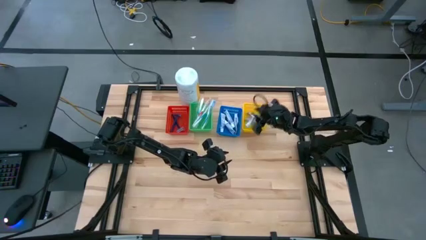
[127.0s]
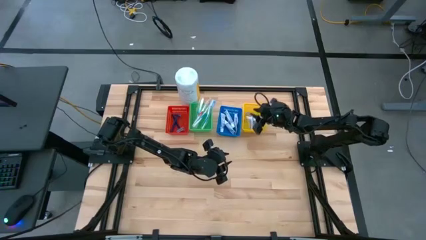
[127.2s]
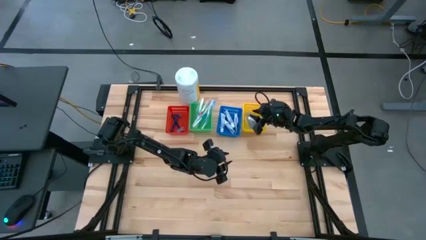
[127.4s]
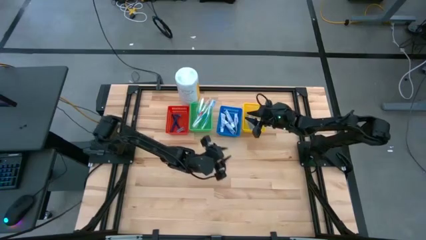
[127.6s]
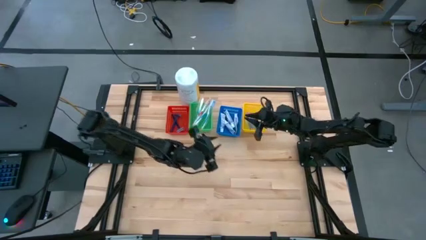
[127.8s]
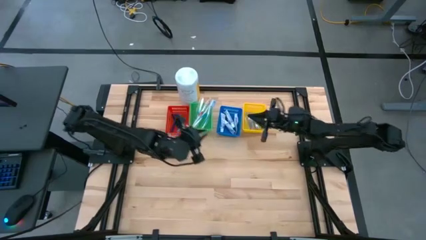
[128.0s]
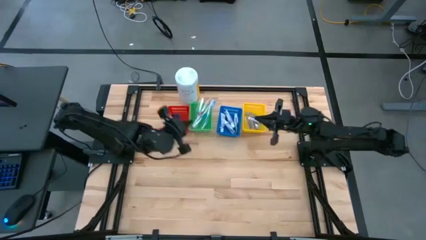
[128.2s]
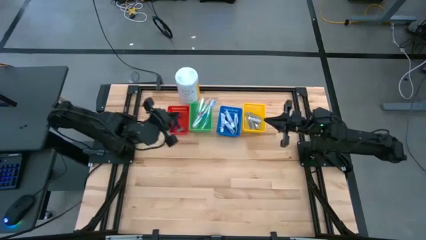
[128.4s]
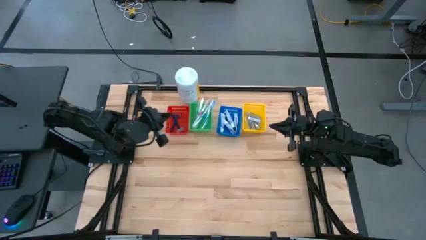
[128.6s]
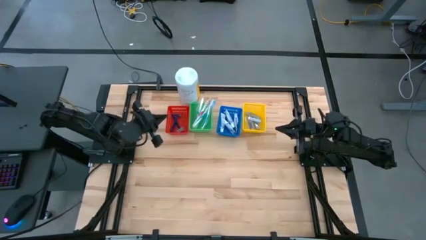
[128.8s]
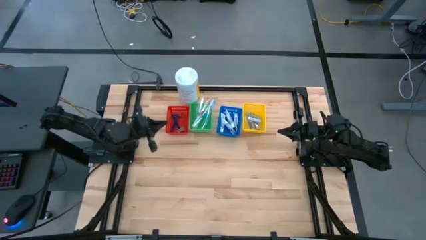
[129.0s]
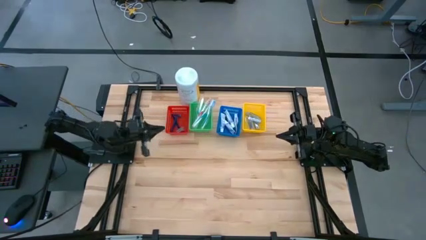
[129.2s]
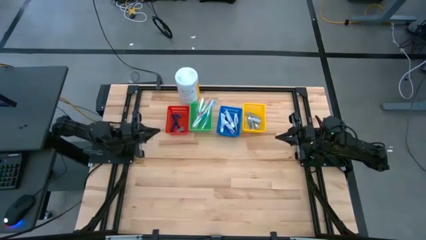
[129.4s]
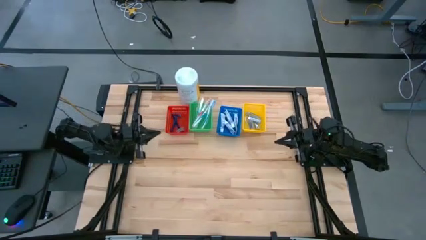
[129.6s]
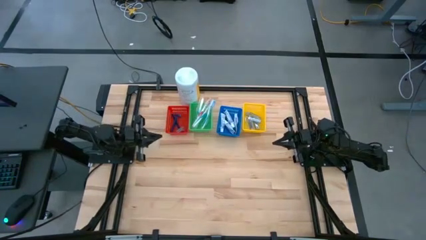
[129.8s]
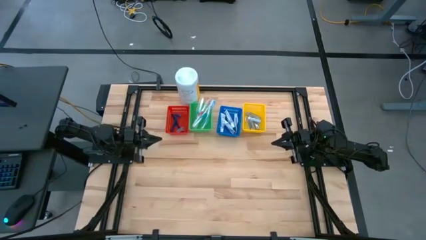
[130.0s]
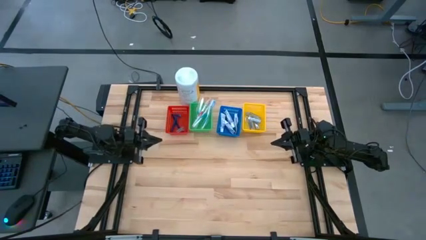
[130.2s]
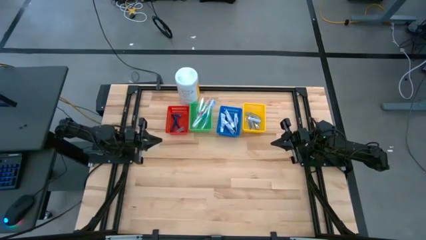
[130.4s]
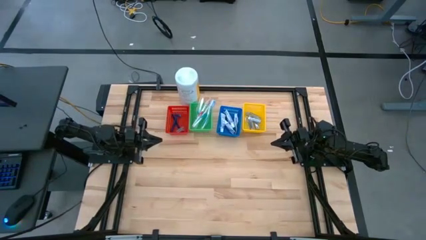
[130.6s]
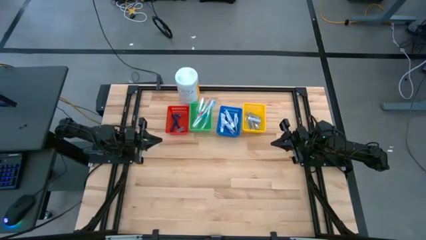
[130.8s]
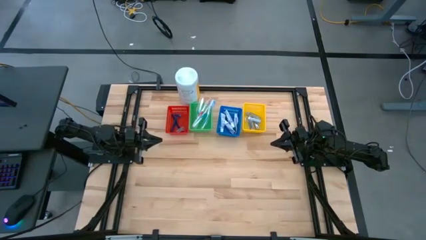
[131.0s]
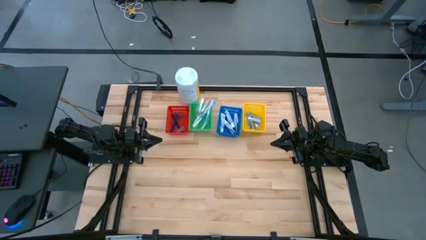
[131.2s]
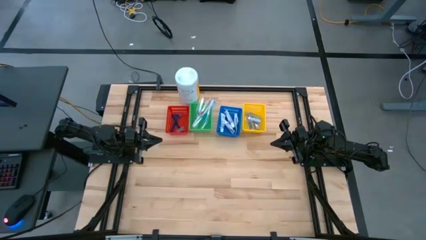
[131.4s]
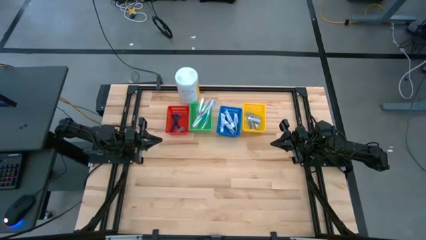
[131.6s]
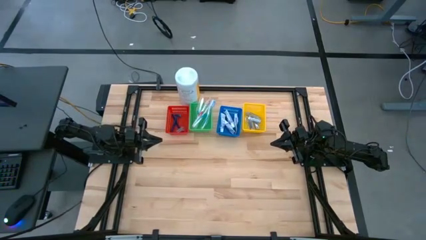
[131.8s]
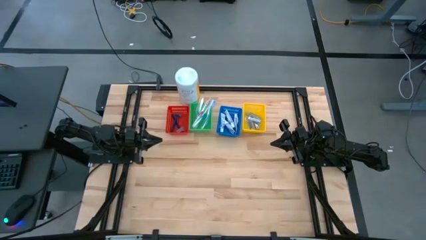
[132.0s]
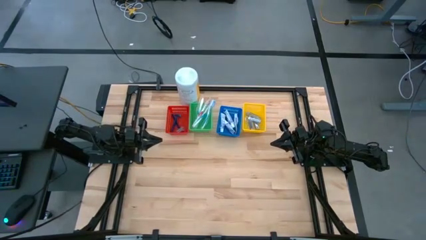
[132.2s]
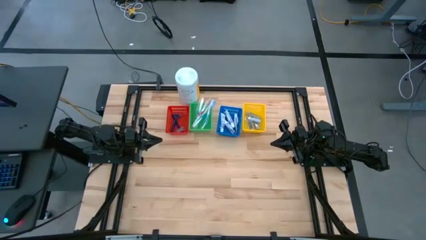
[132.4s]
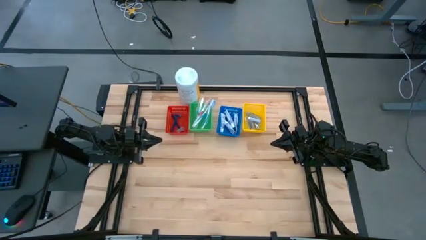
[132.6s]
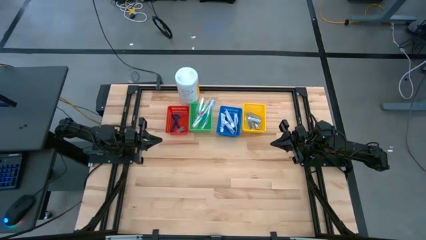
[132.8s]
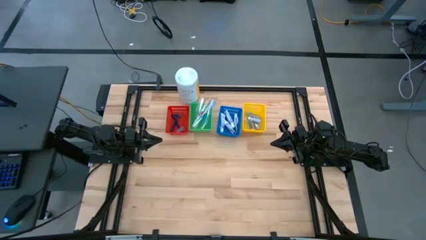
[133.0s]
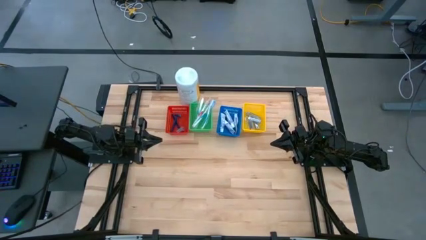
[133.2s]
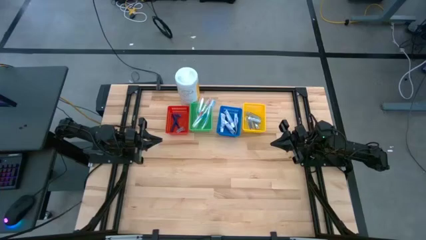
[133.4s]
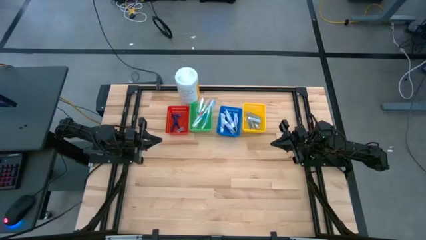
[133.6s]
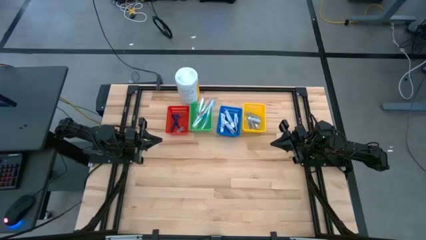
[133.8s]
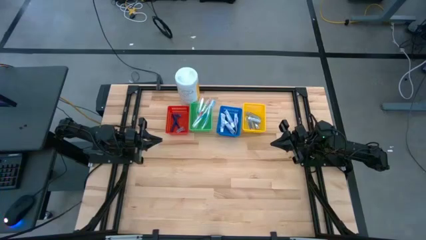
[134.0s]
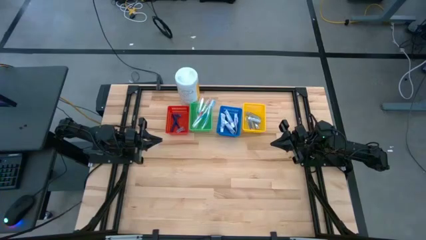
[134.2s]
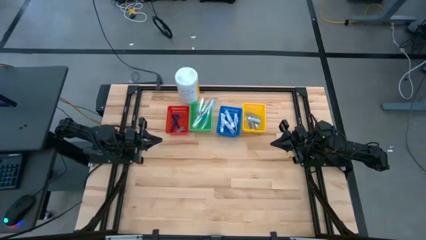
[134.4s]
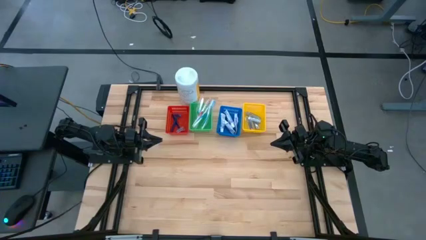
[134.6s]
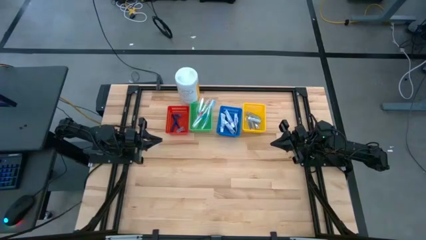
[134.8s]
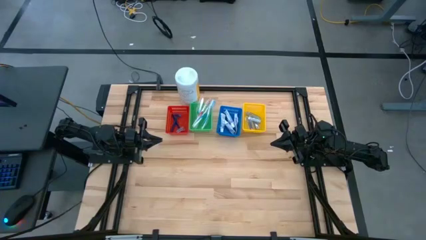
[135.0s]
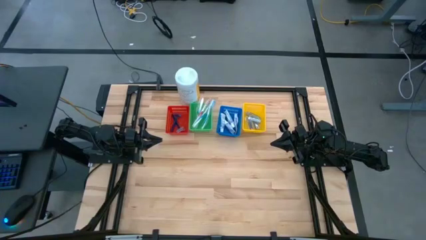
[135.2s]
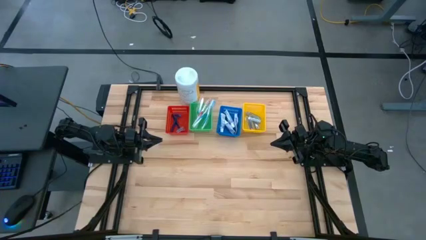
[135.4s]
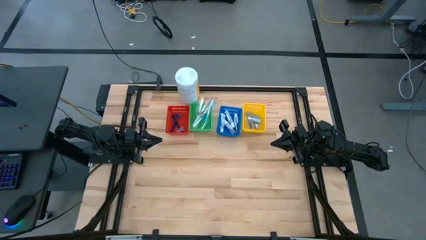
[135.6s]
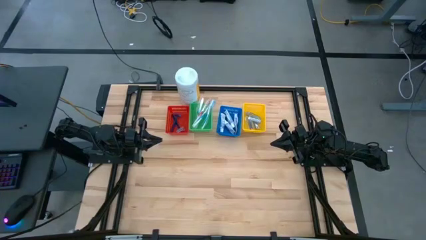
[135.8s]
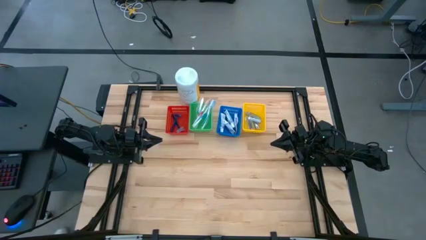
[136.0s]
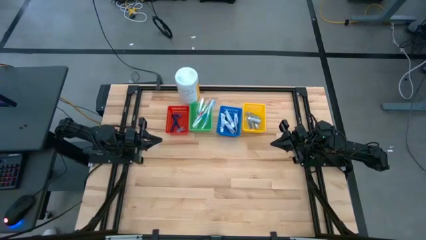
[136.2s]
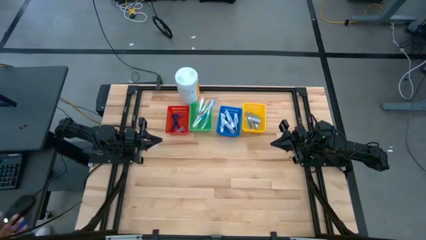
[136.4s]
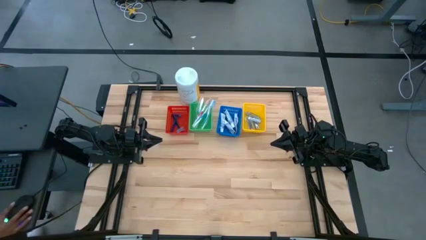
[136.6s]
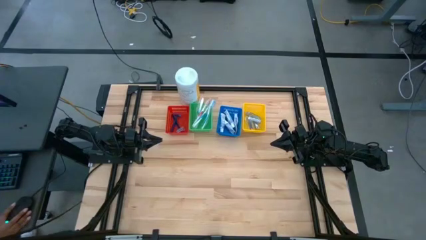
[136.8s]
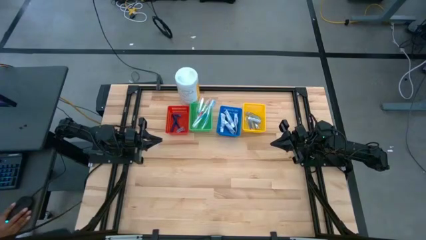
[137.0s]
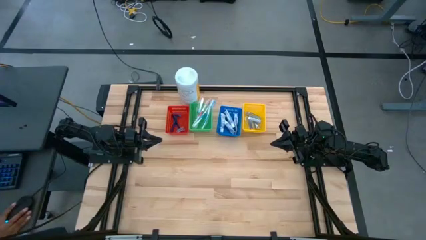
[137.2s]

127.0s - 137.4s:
Task: Pick & Place Travel size toiletries
Return to Home Position

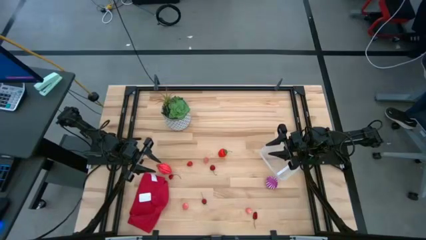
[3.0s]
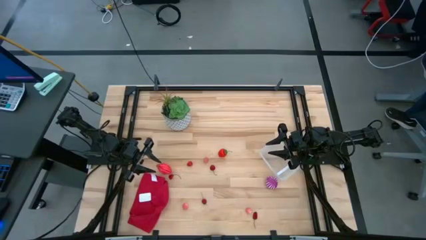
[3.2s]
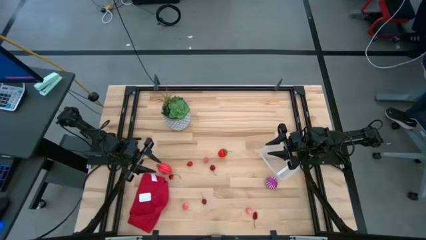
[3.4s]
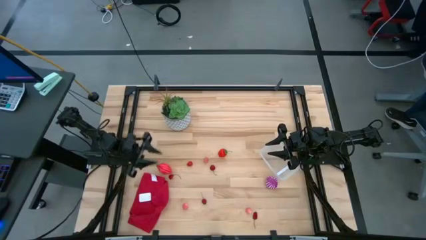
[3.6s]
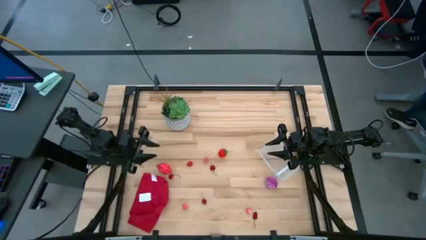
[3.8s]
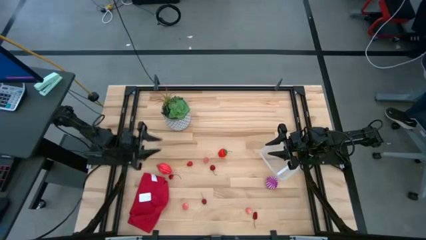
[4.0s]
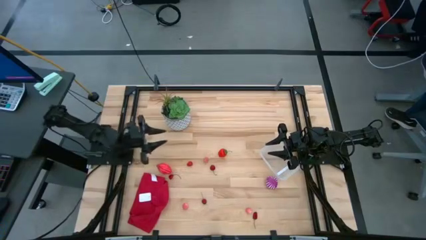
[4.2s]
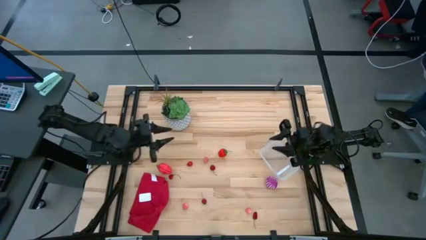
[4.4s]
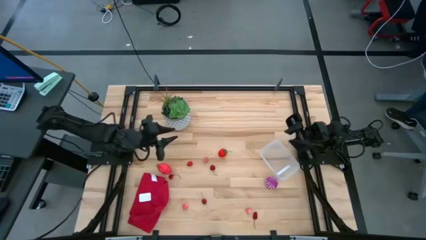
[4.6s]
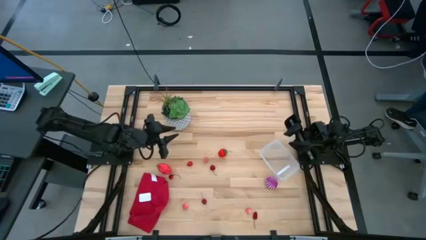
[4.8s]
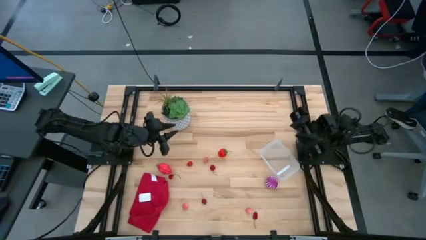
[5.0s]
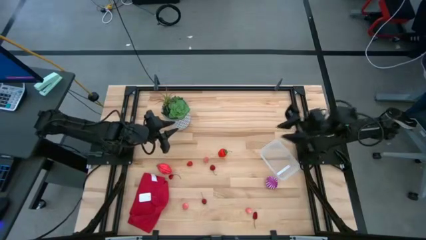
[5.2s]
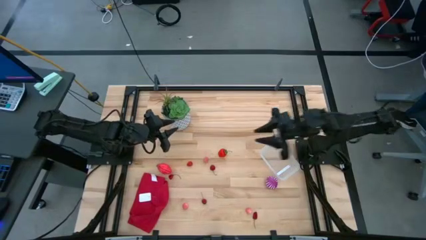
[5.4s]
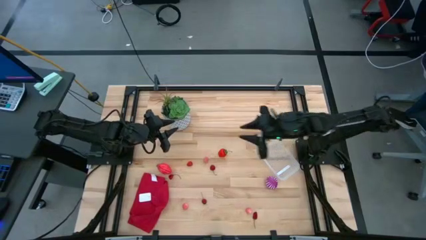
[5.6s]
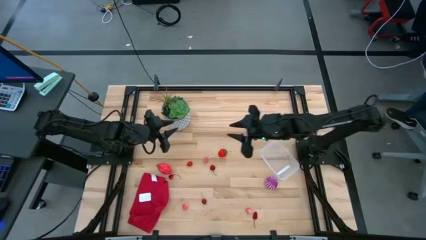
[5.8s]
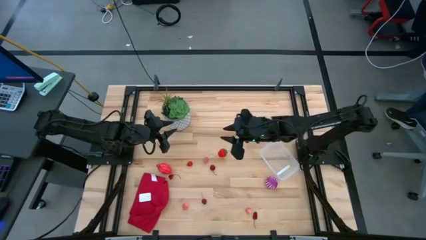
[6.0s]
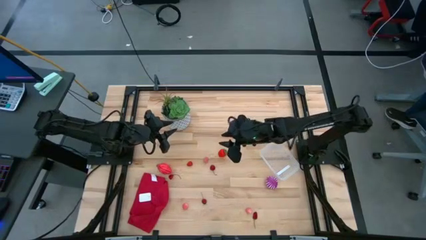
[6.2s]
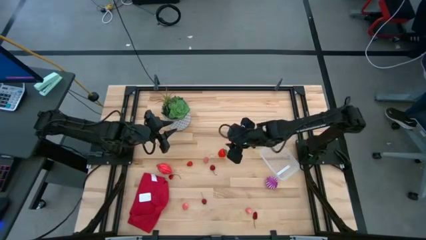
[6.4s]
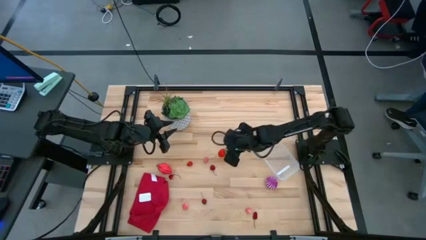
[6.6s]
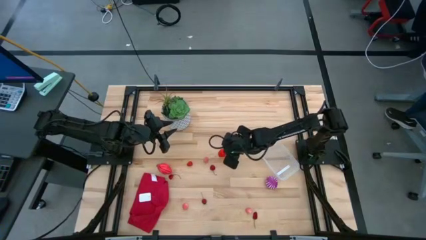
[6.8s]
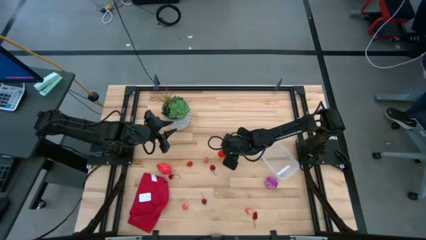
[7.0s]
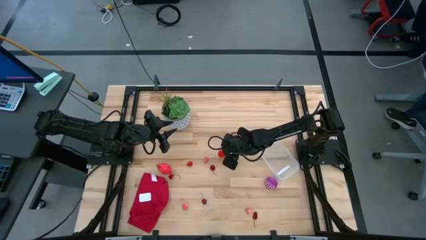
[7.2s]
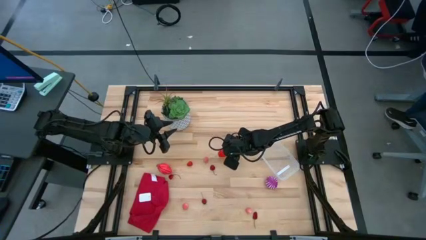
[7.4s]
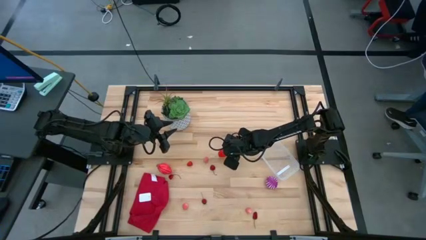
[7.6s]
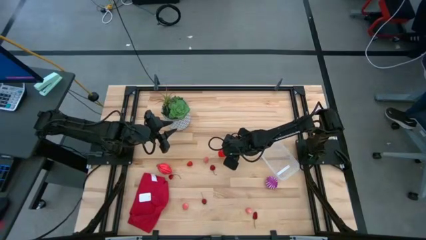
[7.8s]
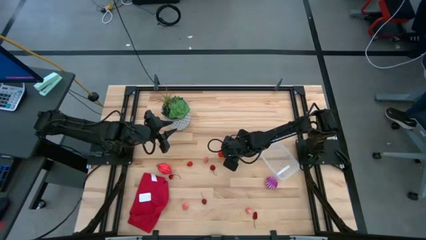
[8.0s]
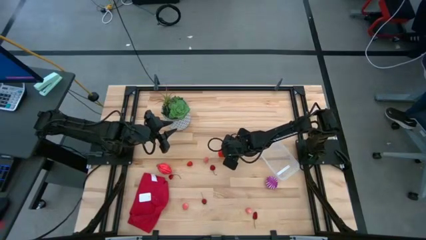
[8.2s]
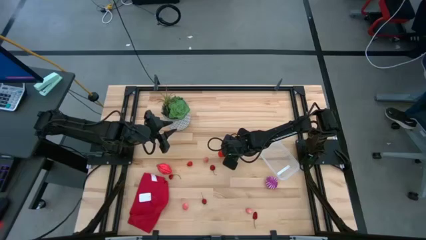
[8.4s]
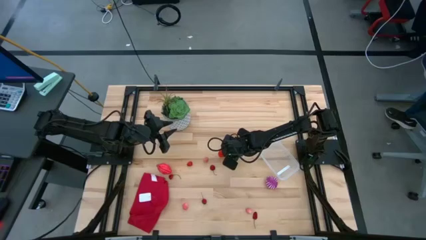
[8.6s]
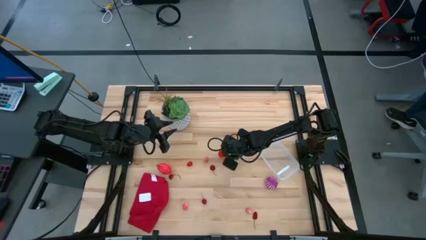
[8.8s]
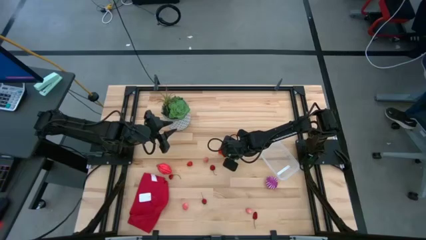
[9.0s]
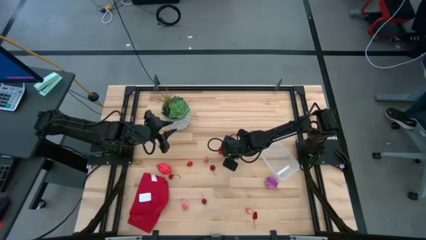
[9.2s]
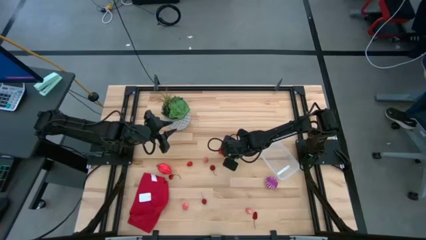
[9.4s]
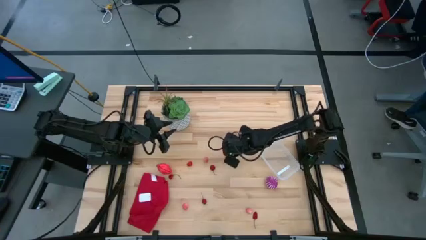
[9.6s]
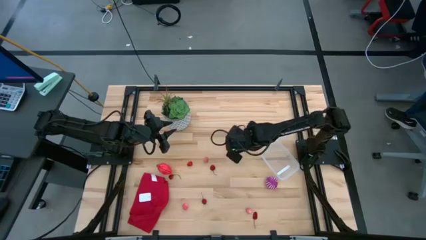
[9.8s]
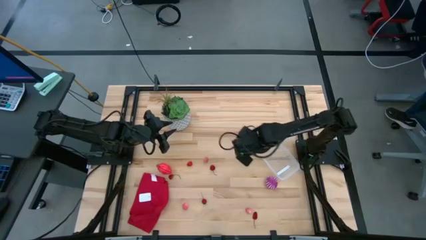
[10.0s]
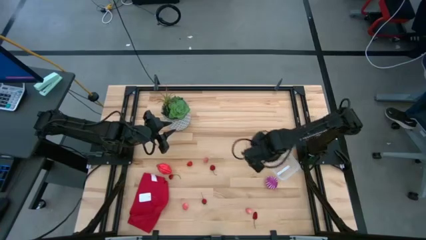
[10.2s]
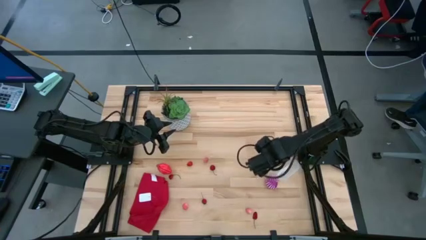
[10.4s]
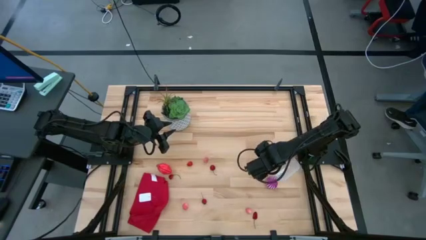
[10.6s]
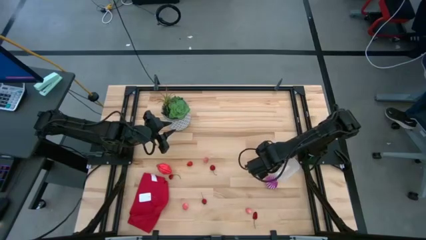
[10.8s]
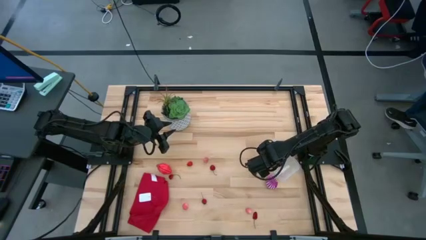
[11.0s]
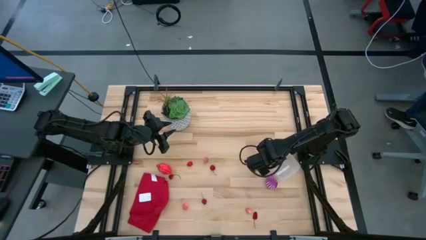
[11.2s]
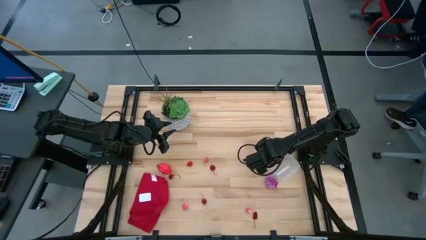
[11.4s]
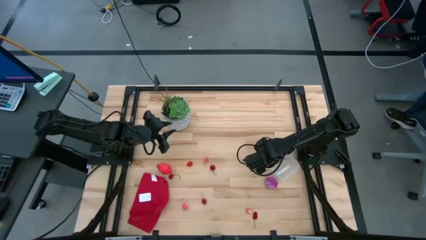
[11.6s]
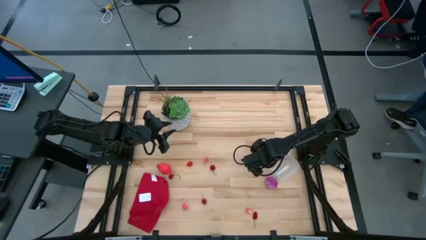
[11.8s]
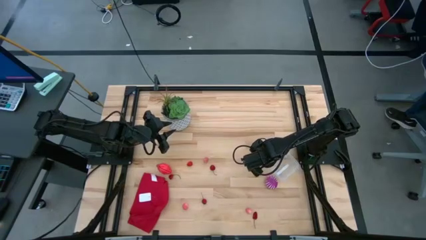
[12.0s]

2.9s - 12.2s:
Task: Pick and placing Produce into tupperware
Put the red strawberry into the transparent bin
